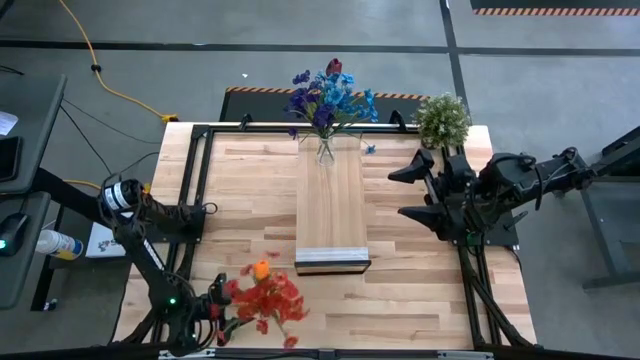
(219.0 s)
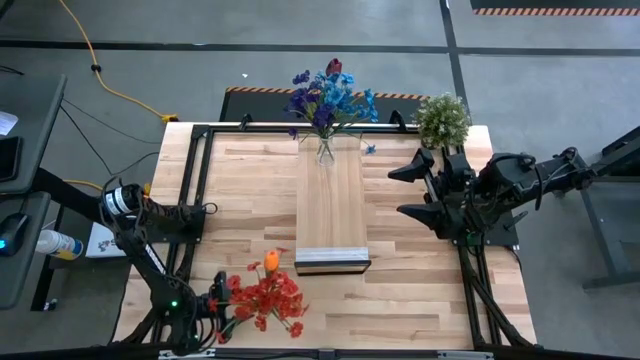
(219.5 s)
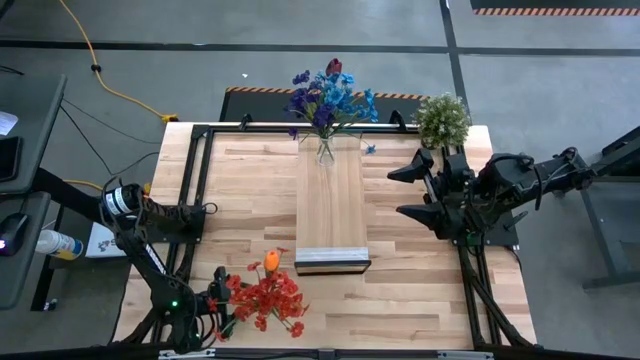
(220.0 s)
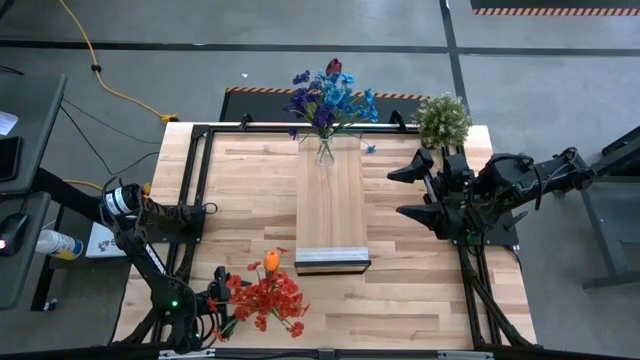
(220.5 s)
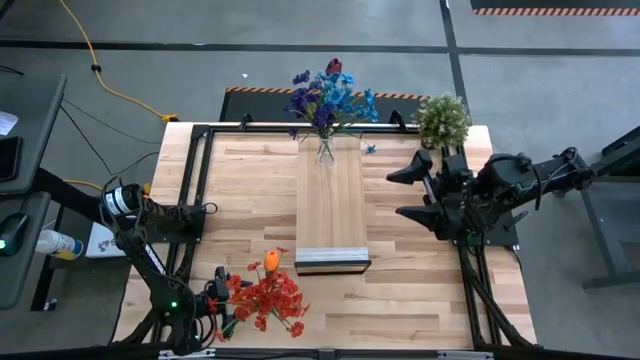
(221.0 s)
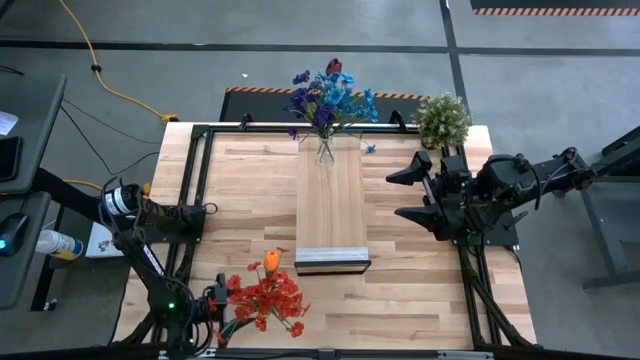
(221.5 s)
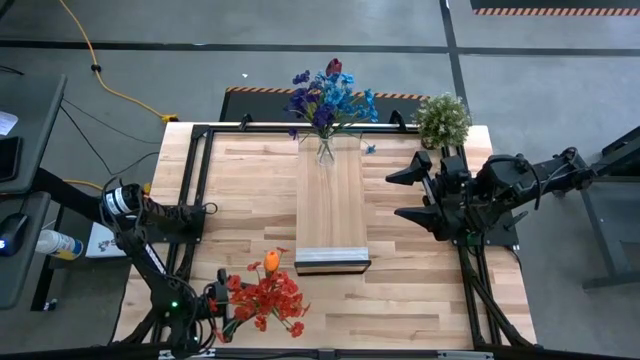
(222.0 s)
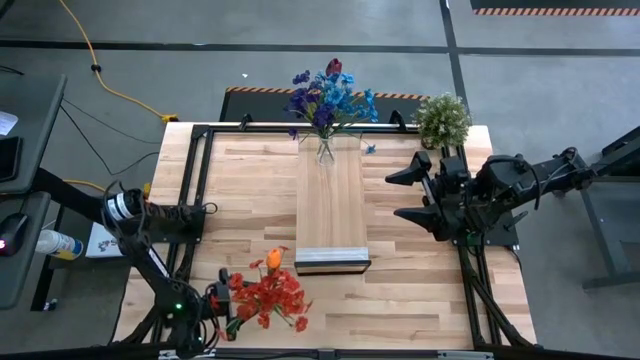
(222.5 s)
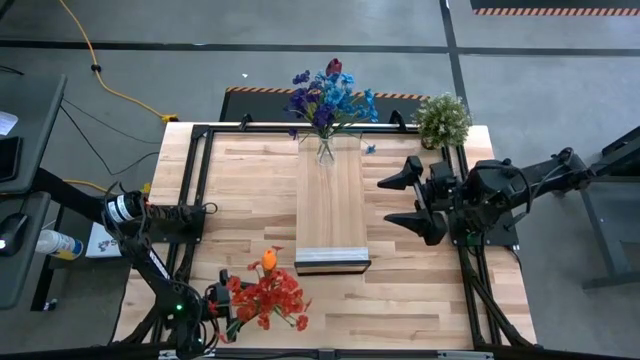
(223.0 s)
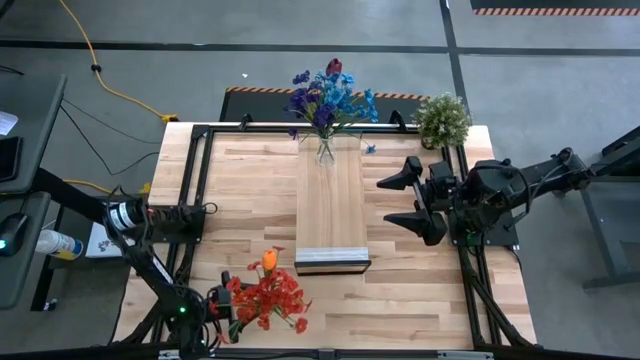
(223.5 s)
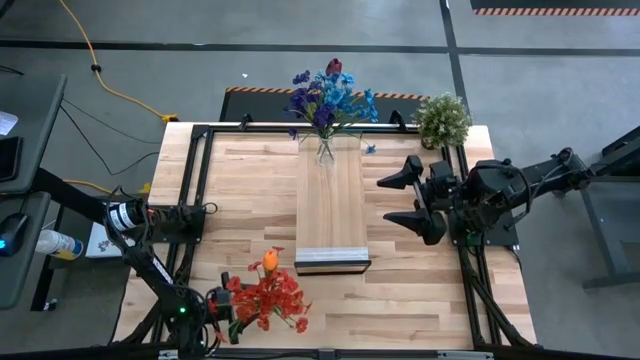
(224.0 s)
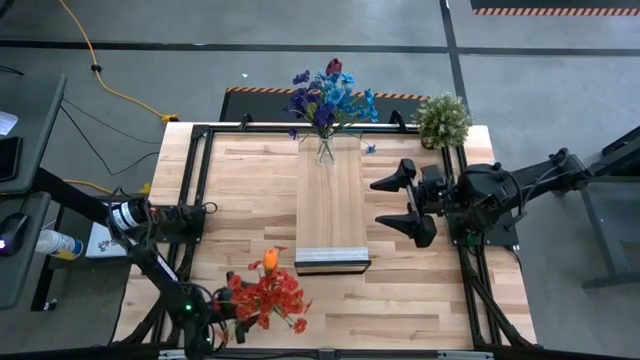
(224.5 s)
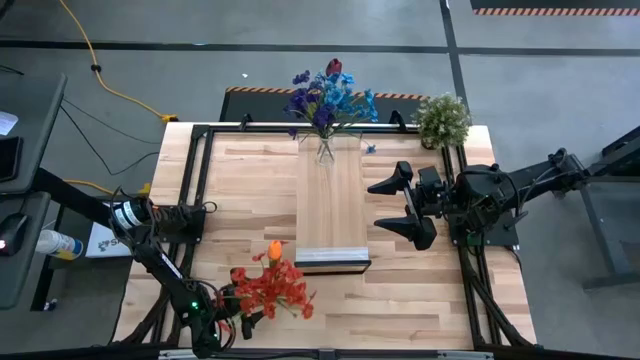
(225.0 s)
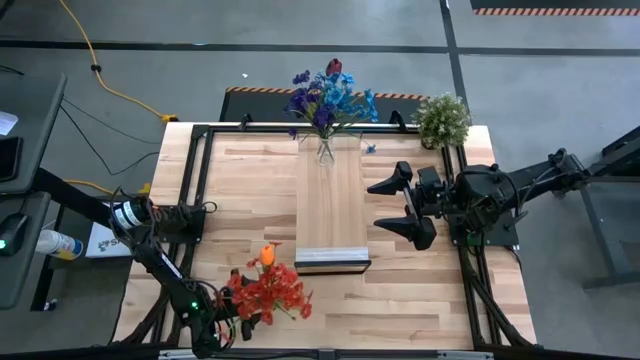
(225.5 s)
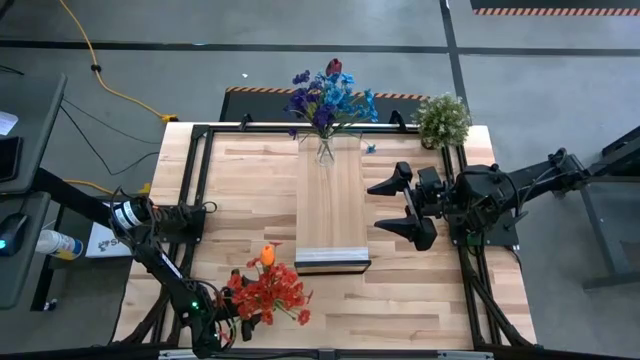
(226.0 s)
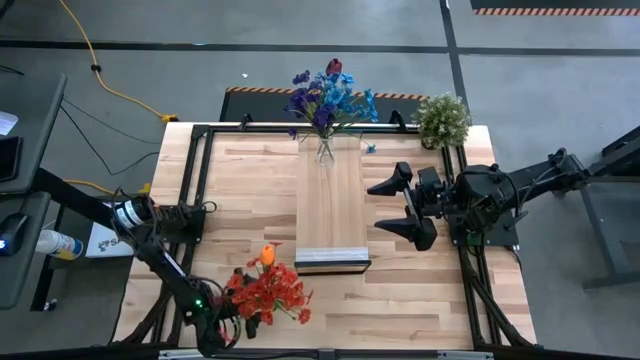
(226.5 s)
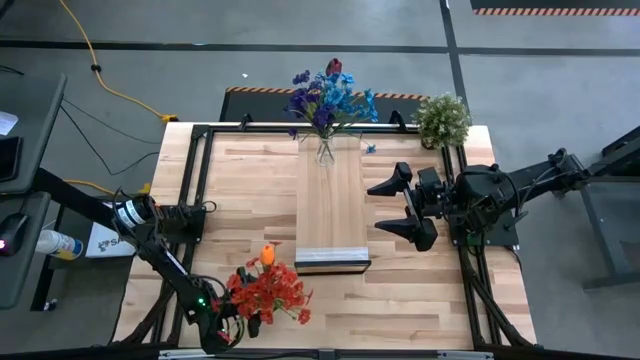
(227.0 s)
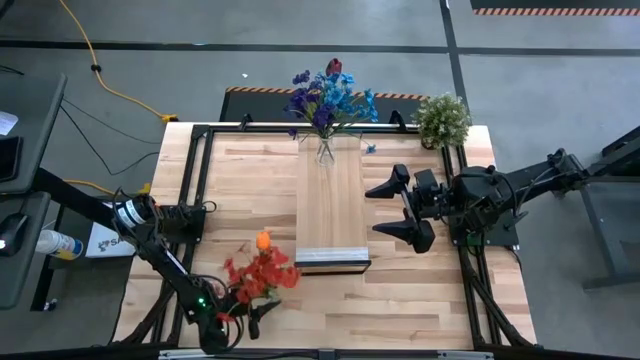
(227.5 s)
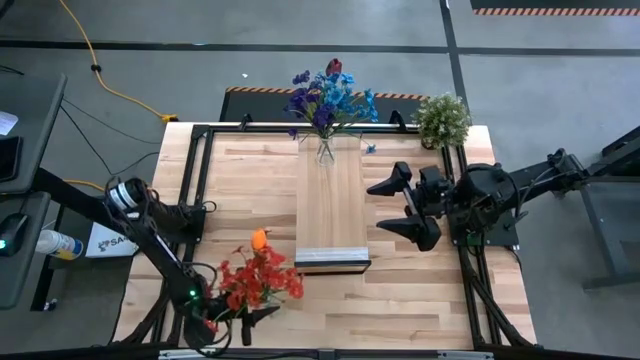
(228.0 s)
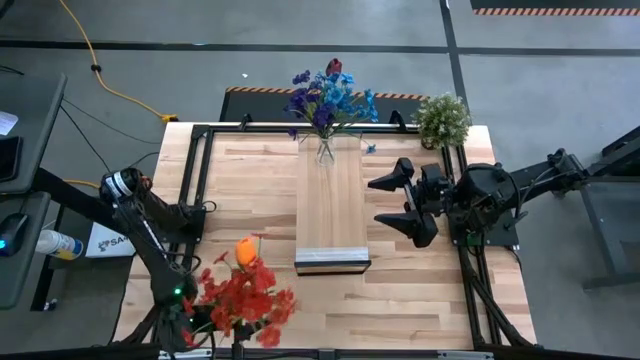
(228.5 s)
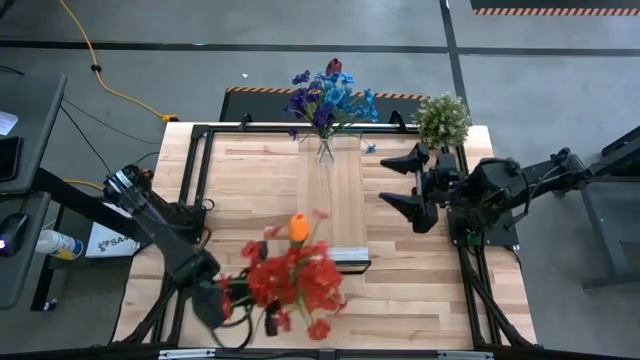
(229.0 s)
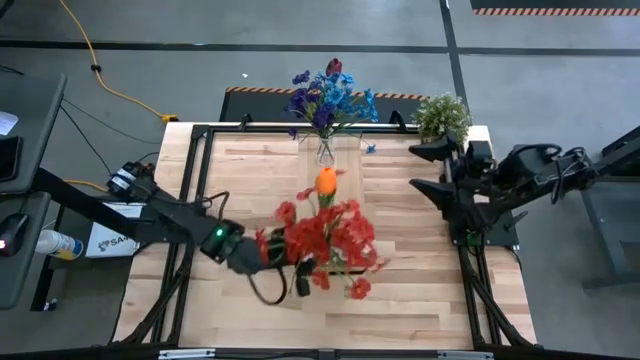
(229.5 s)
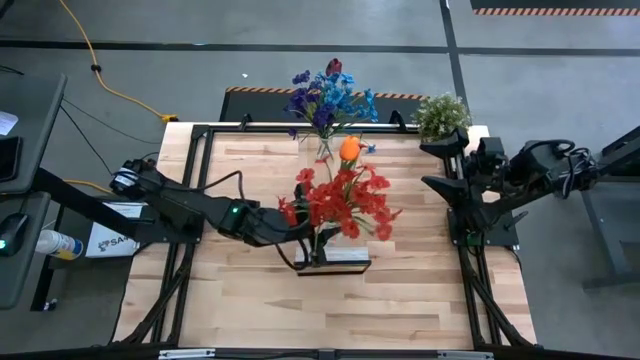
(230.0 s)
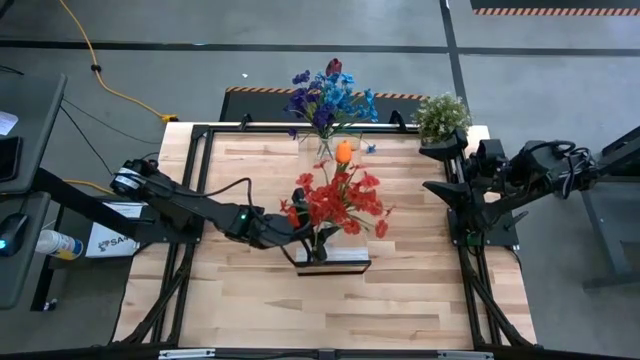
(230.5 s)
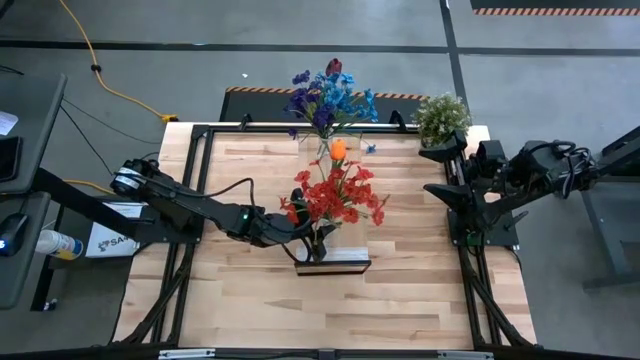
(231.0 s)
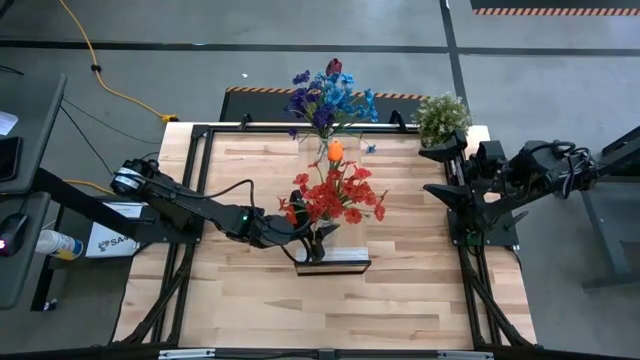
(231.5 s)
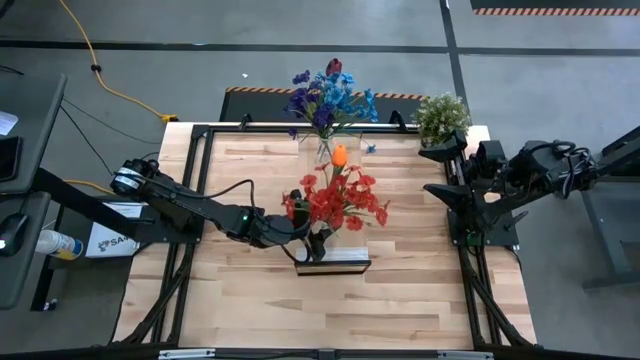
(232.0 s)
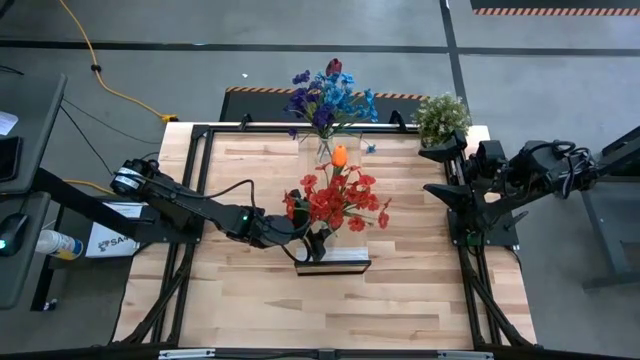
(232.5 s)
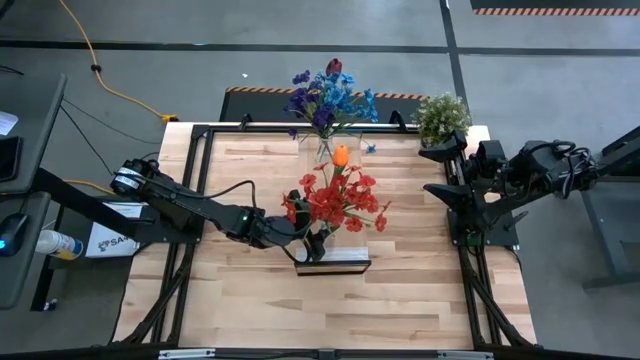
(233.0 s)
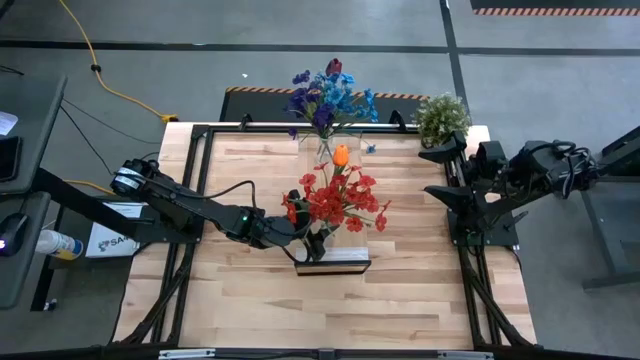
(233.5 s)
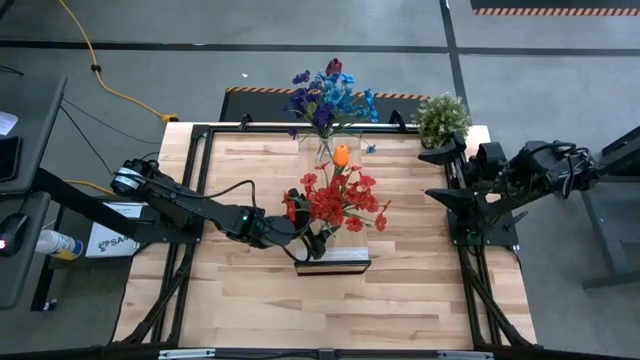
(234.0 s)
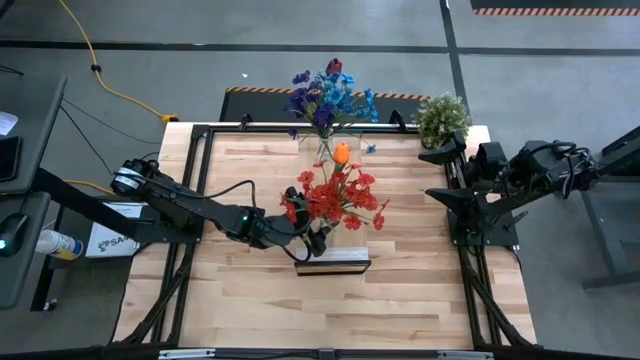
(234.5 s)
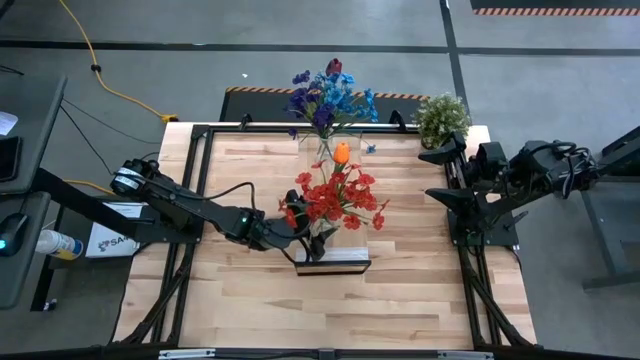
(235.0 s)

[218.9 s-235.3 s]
Task: Pick and place flowers into a vace then onto a shelf
Put the transparent vase with the flowers on the shelf

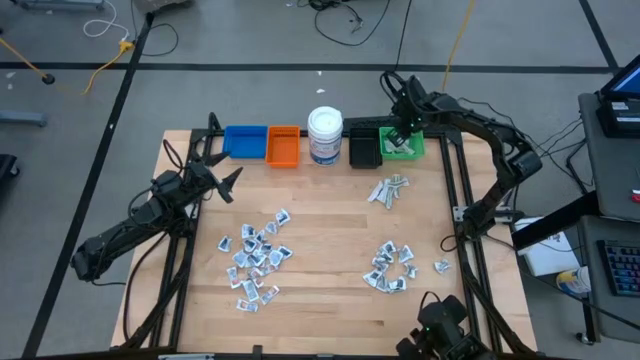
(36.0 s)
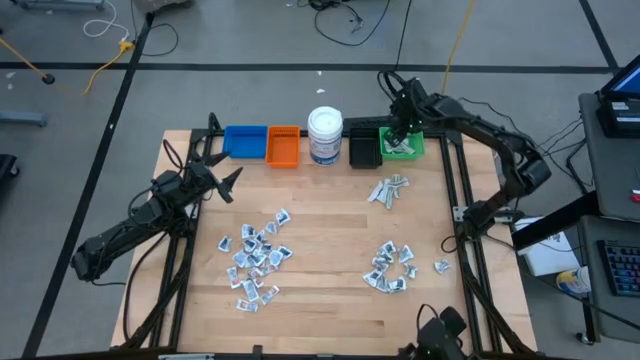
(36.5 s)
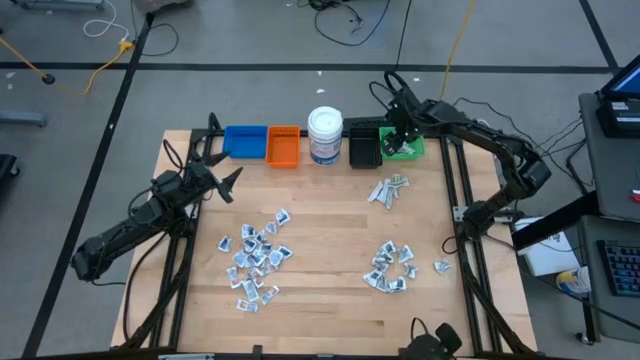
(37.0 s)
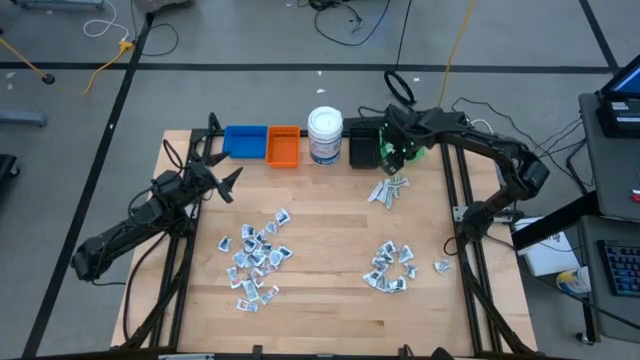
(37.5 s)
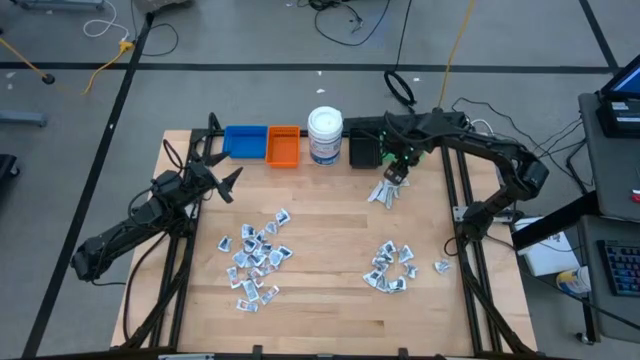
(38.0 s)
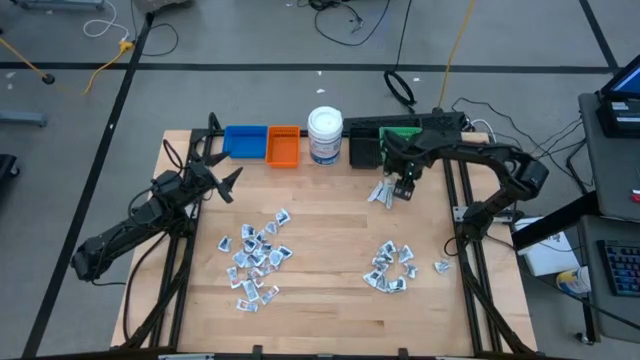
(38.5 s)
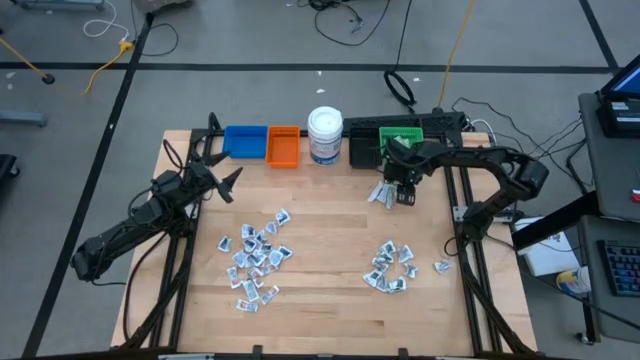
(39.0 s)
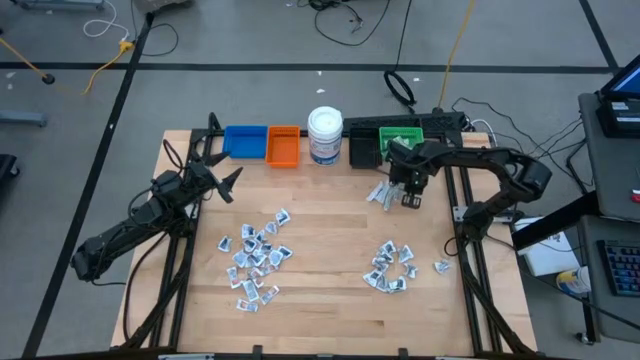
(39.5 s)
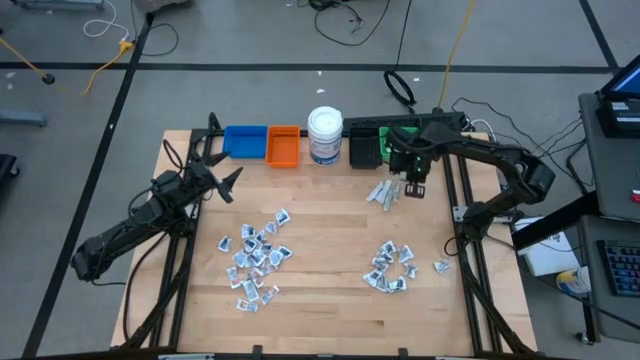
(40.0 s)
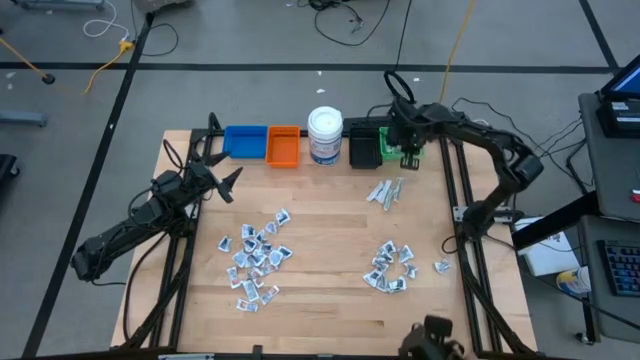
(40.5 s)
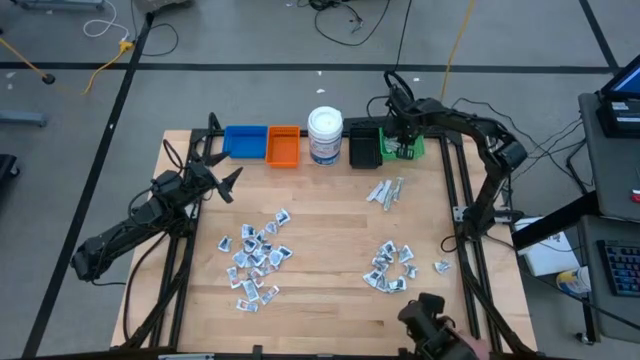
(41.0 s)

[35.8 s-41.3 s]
Task: Pick & Place First Aid Supplies
Put the bandage into the green bin
